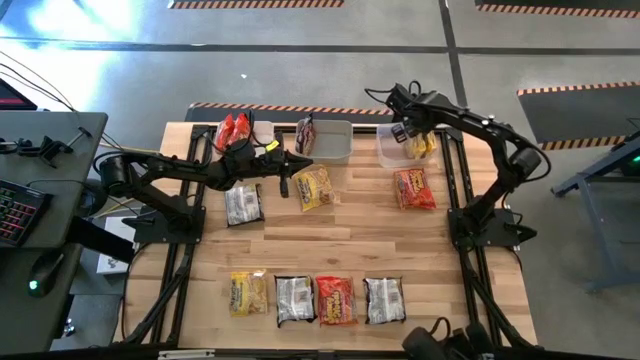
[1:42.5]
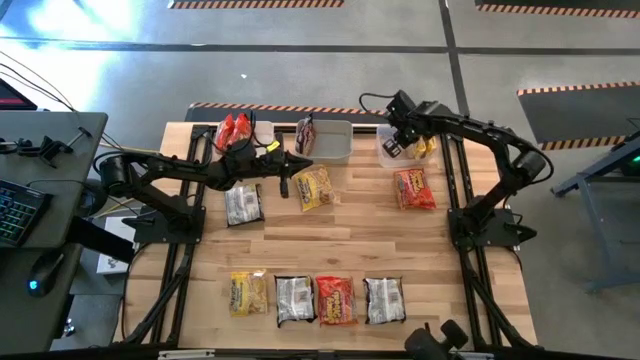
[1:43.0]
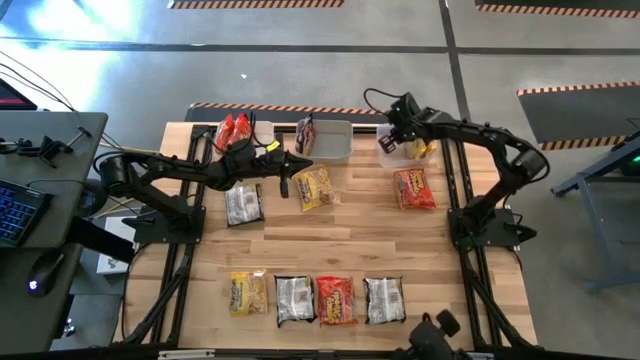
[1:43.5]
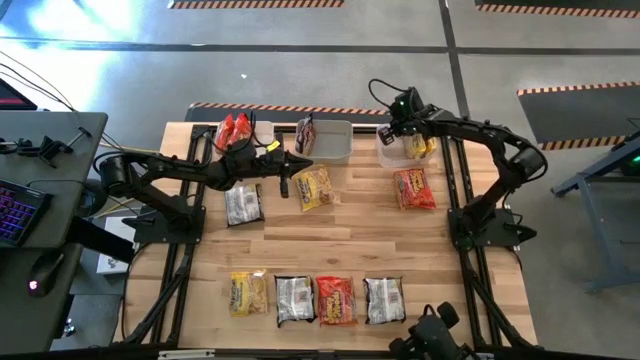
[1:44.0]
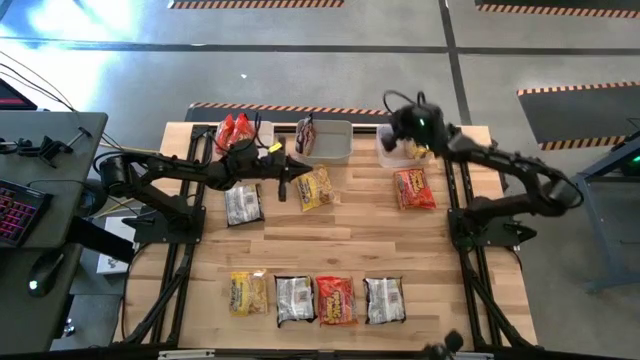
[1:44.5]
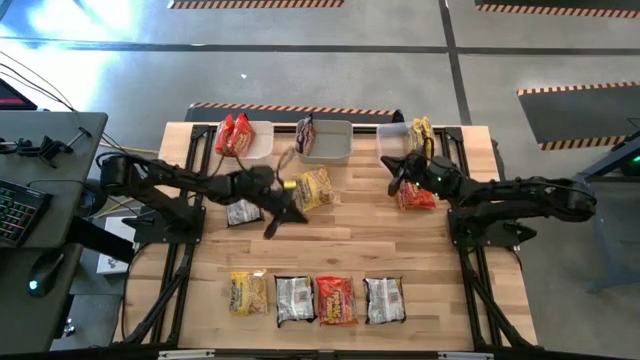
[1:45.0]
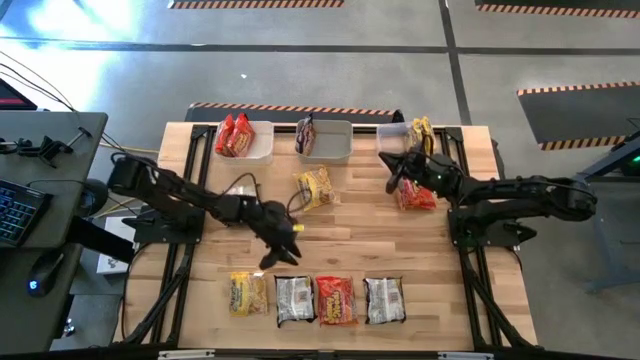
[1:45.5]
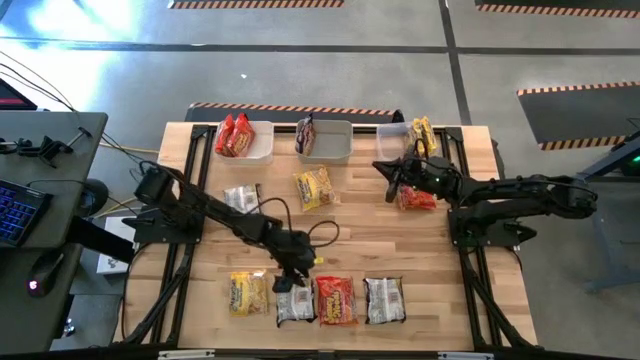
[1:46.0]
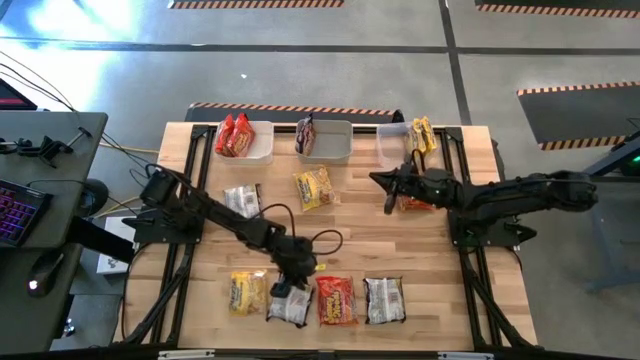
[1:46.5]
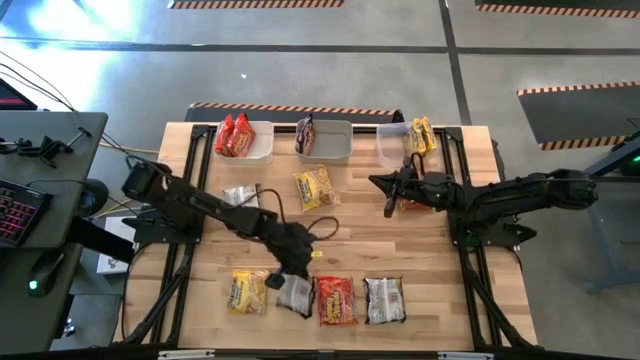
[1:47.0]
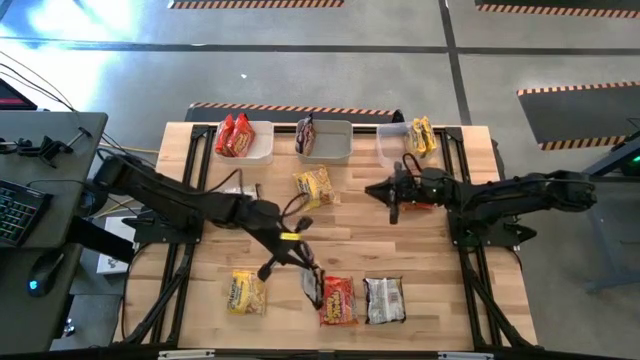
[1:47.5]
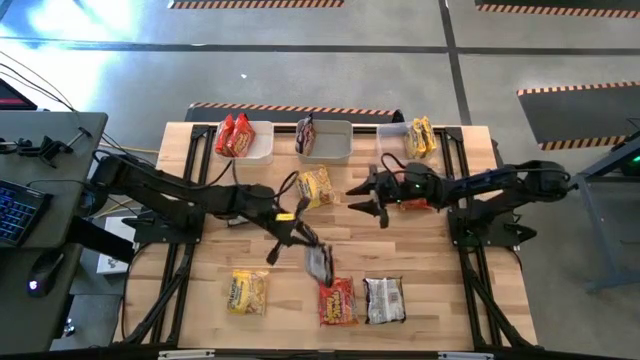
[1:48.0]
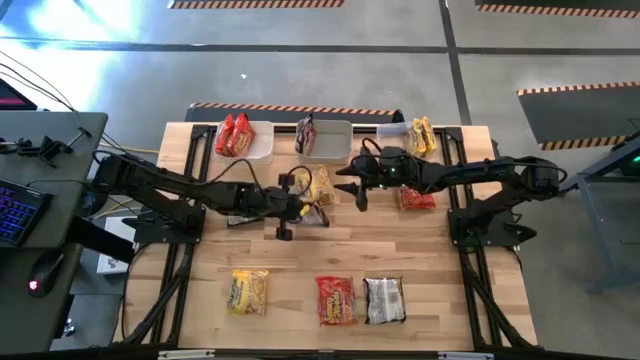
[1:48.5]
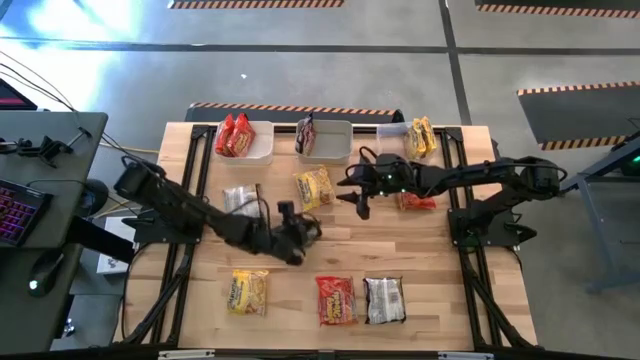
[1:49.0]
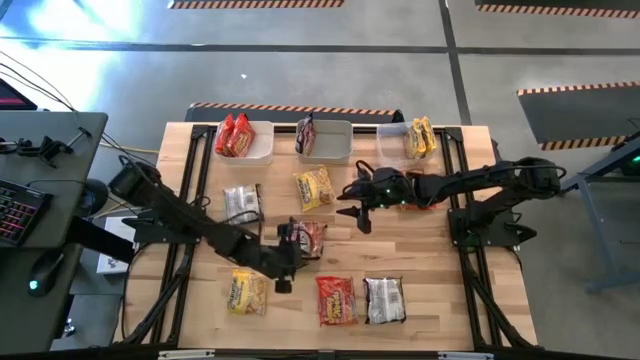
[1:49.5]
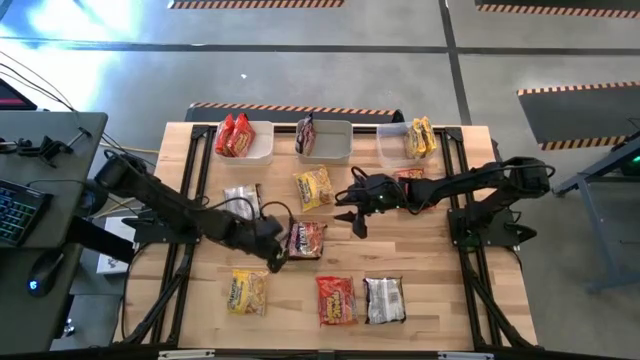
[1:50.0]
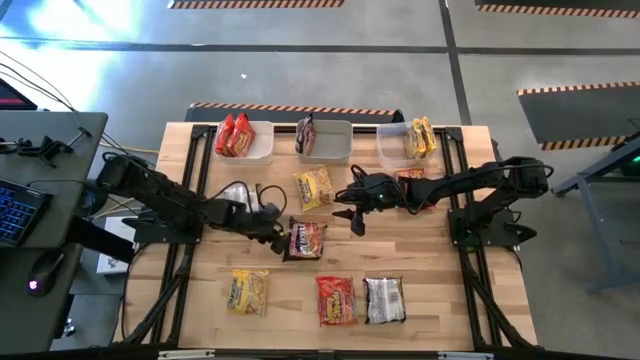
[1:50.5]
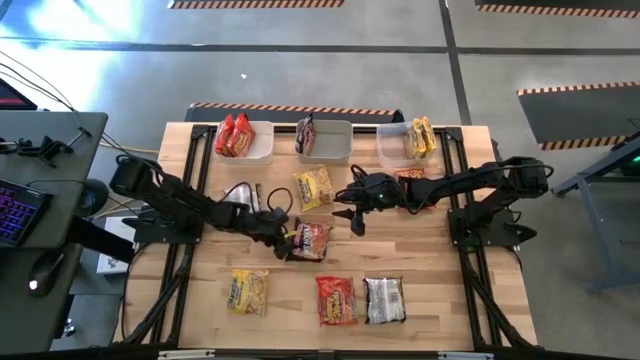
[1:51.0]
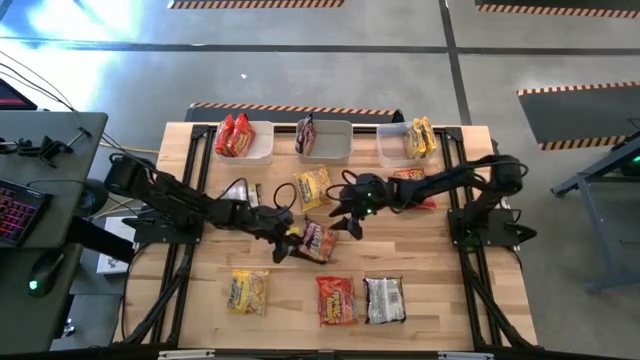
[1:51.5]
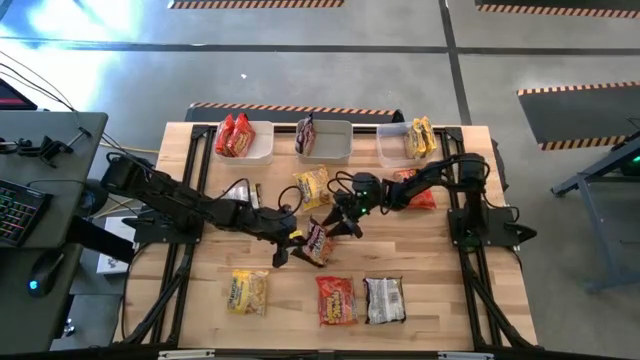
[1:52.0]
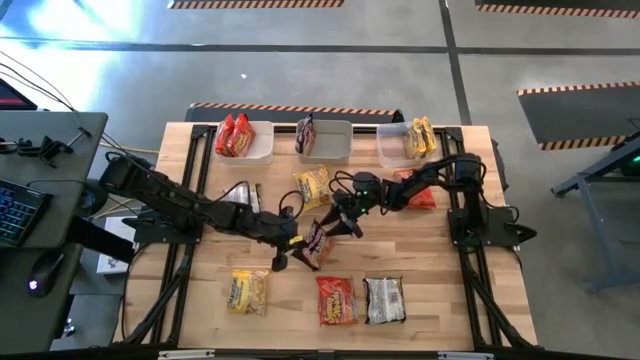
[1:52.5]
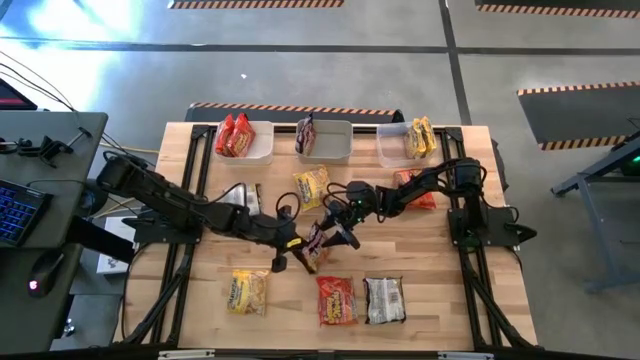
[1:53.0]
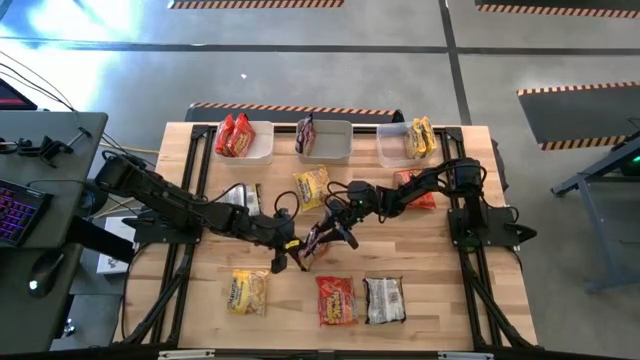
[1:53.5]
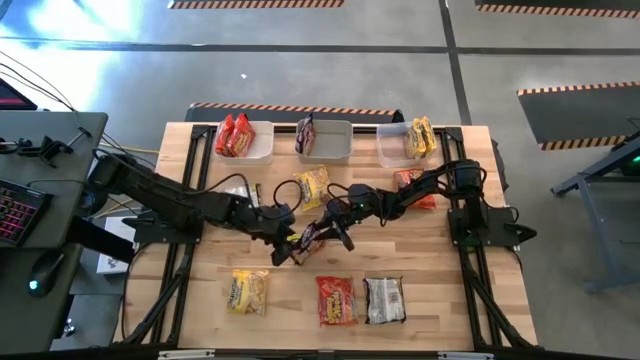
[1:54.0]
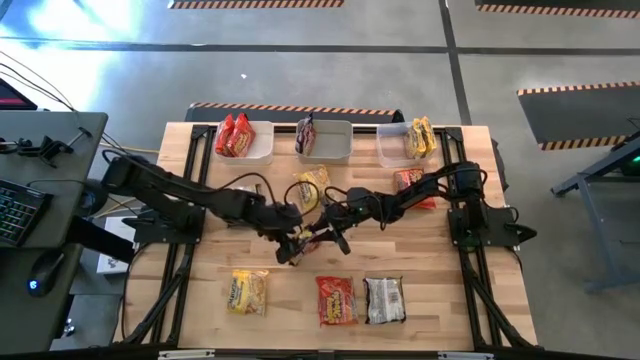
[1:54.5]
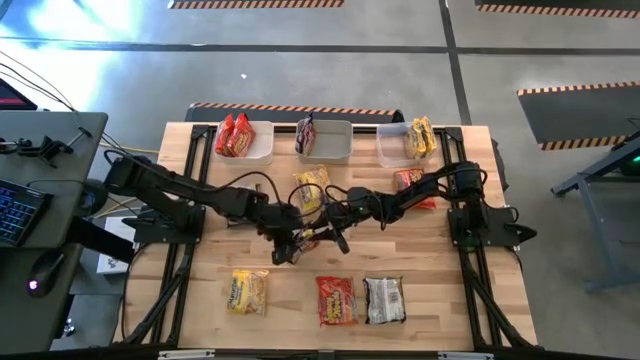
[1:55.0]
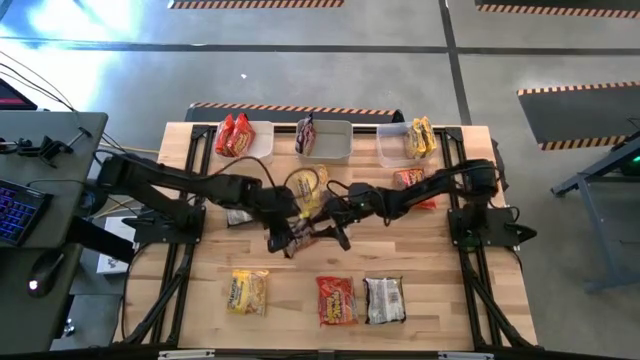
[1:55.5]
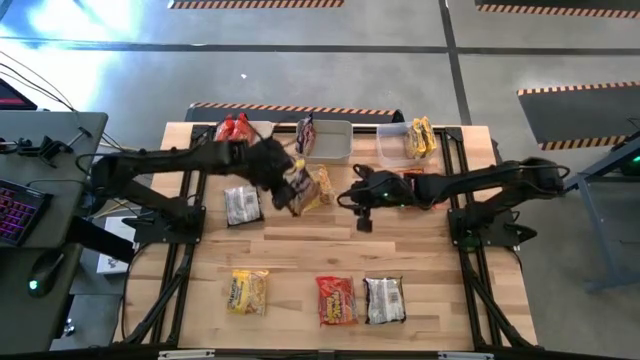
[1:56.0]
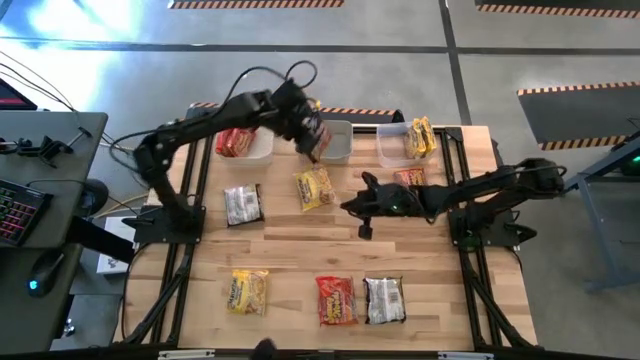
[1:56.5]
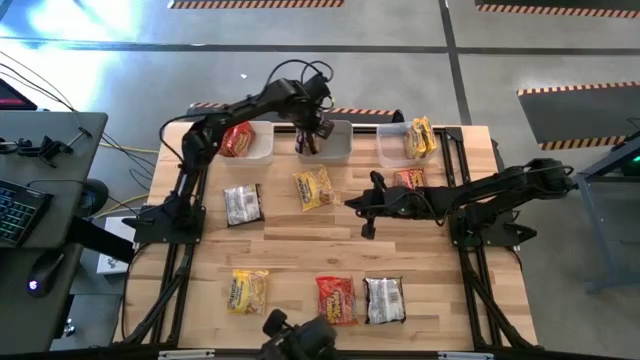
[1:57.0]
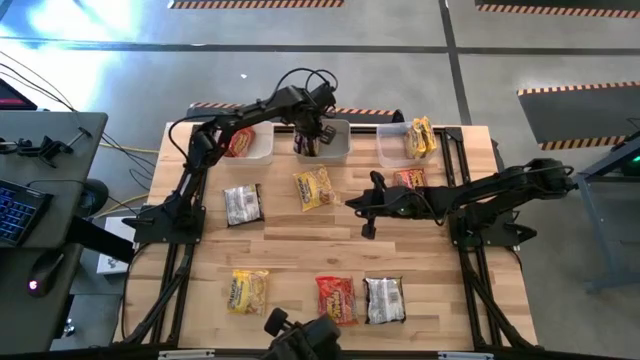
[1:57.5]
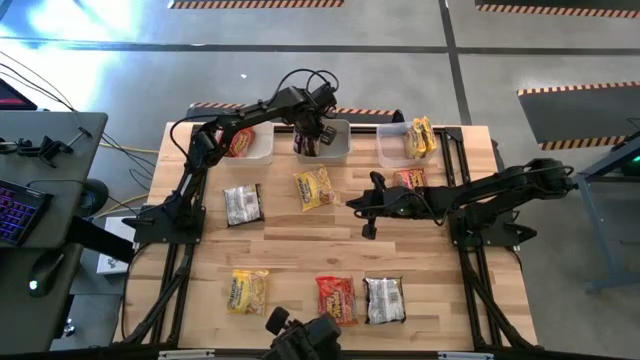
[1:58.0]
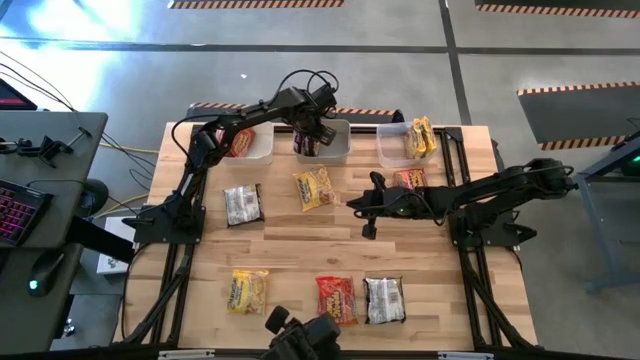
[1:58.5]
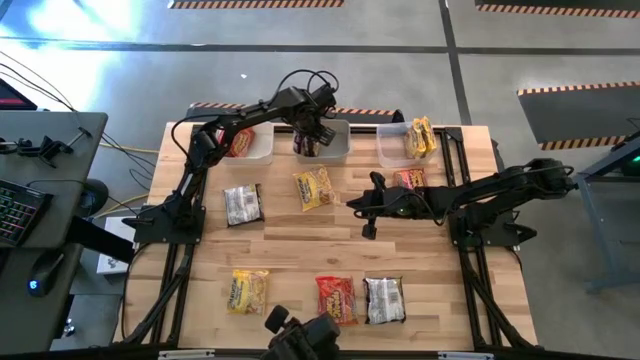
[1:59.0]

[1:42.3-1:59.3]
Task: Sort Maruchan noodles
Put the black noodle pack into the gray bin

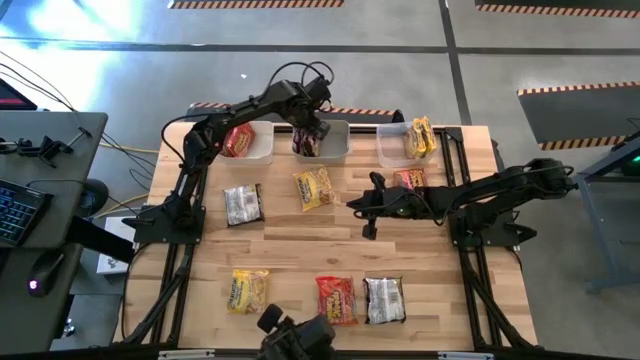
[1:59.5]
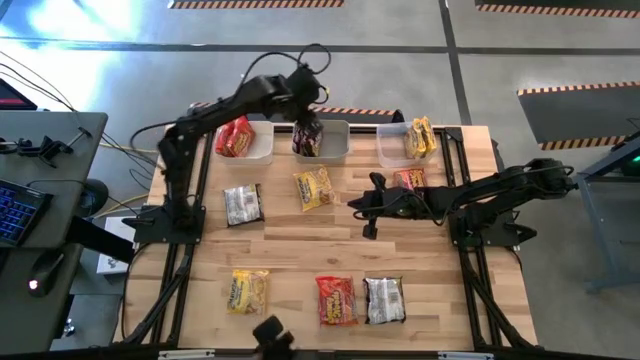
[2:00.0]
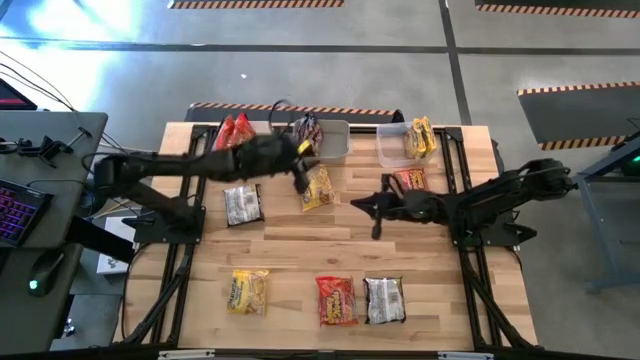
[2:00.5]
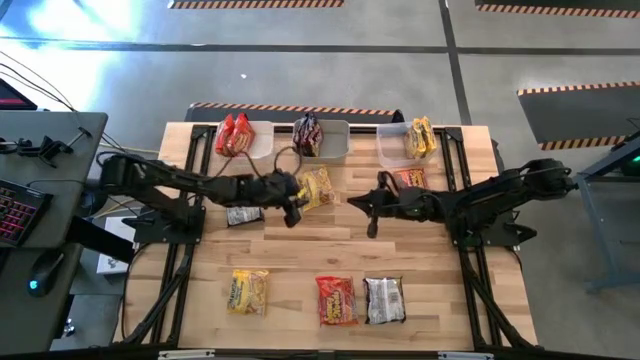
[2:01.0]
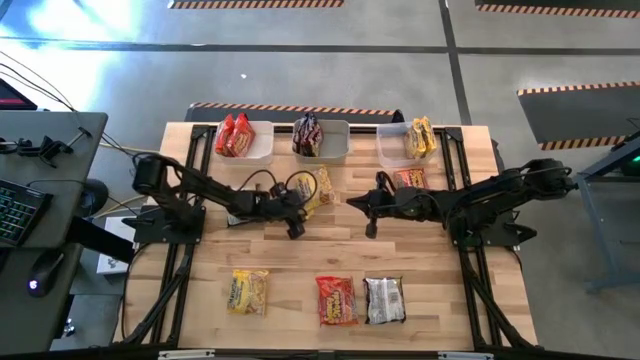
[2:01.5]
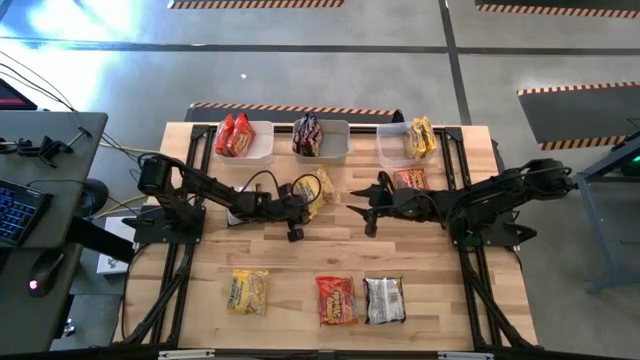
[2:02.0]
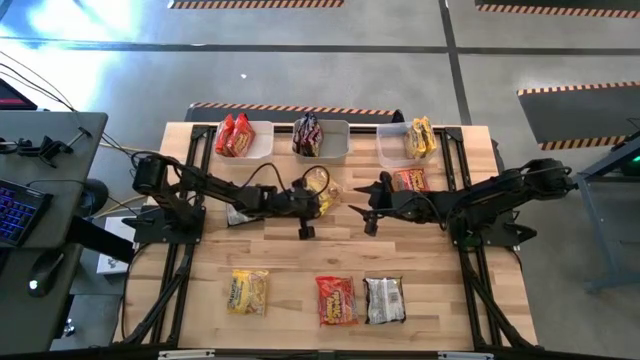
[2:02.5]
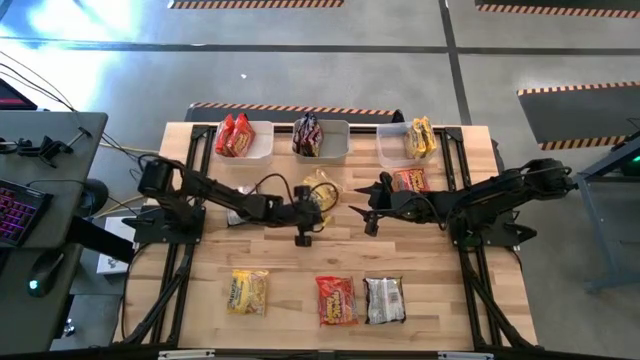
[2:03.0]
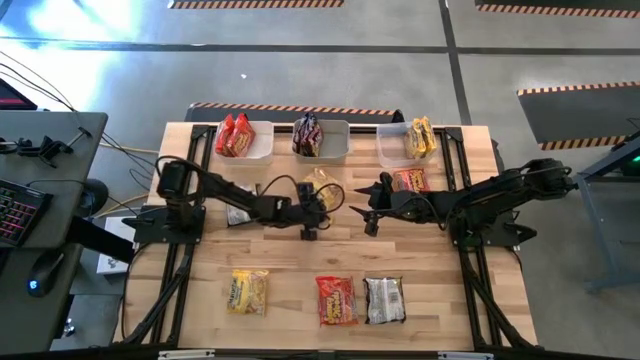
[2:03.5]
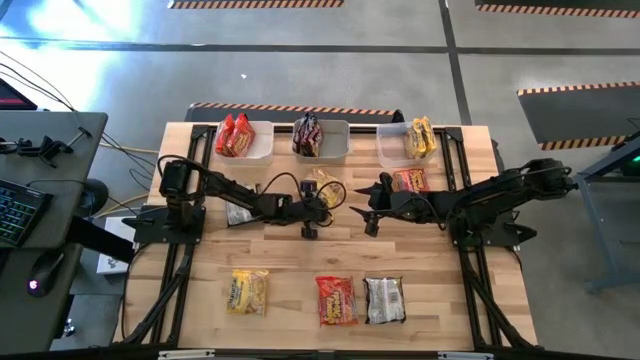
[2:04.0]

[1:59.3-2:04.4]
Put the yellow noodle pack into the transparent bin
